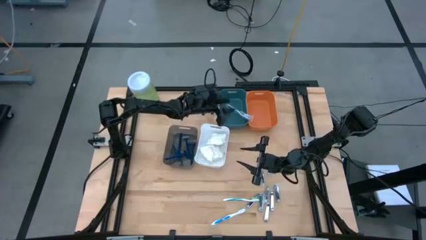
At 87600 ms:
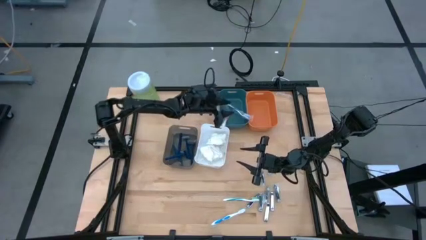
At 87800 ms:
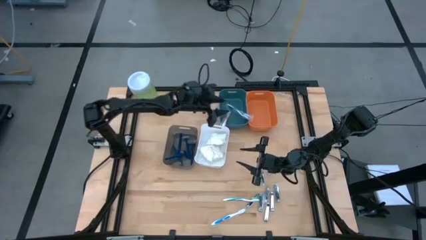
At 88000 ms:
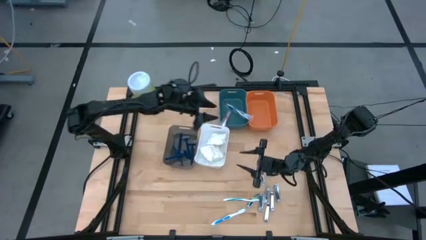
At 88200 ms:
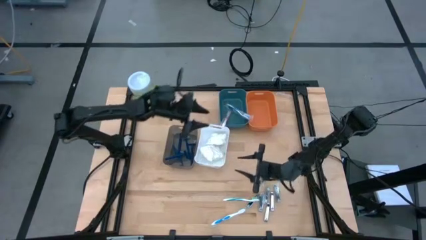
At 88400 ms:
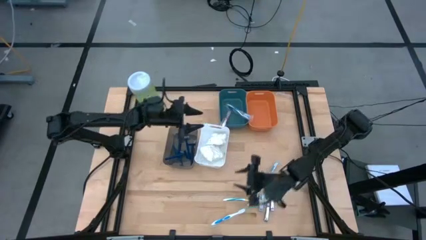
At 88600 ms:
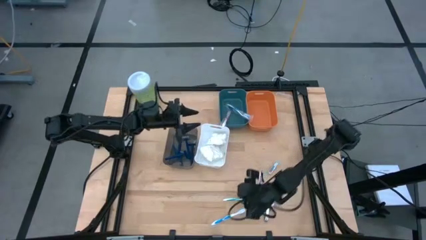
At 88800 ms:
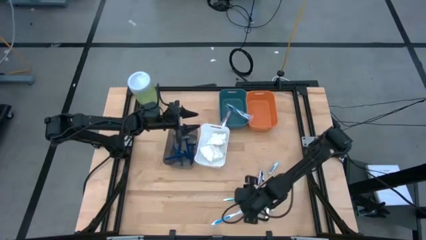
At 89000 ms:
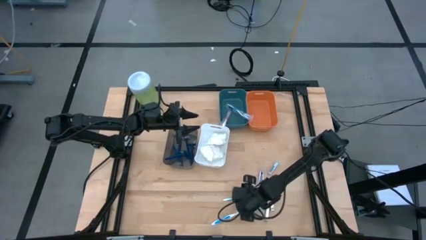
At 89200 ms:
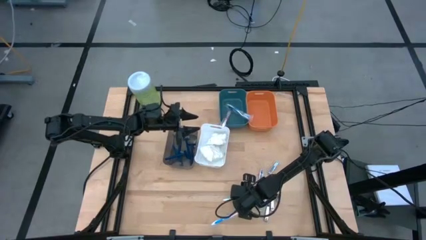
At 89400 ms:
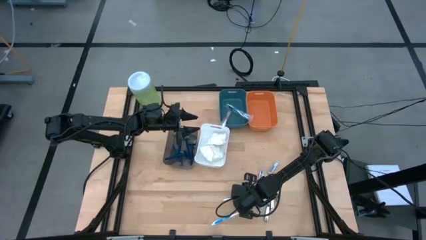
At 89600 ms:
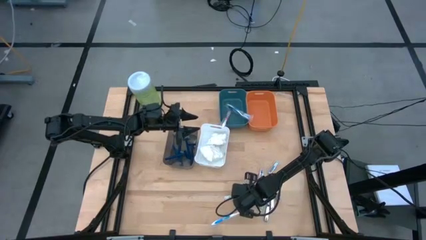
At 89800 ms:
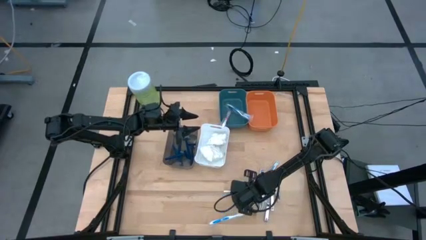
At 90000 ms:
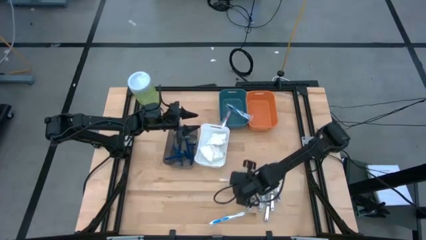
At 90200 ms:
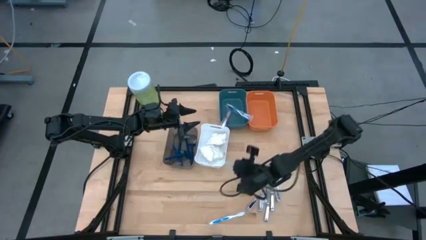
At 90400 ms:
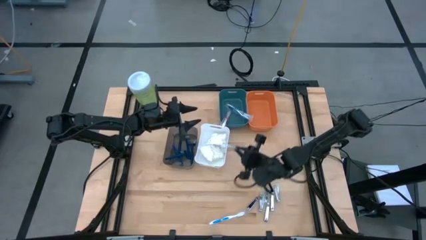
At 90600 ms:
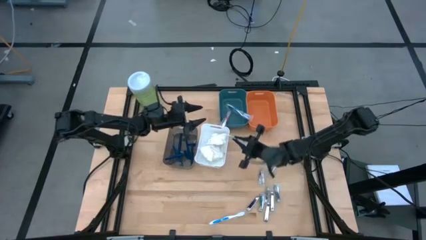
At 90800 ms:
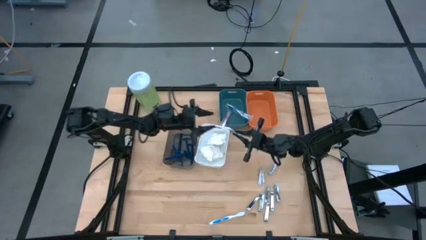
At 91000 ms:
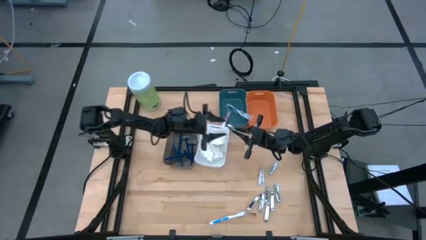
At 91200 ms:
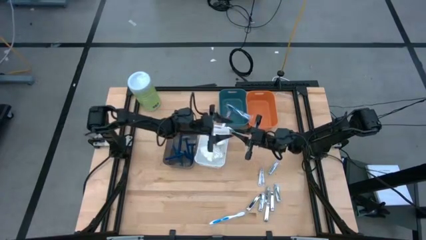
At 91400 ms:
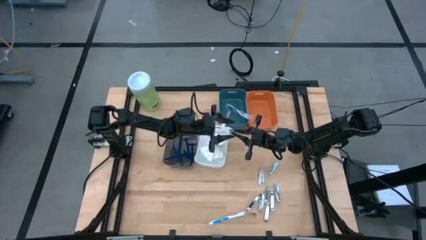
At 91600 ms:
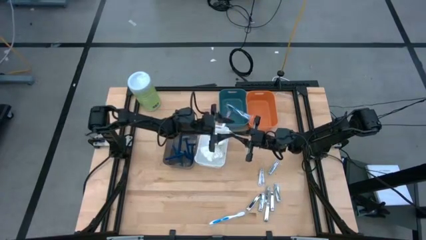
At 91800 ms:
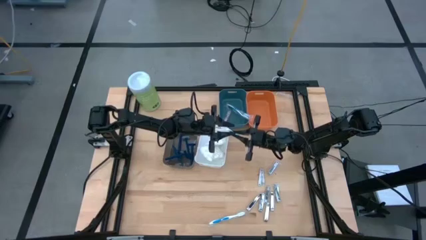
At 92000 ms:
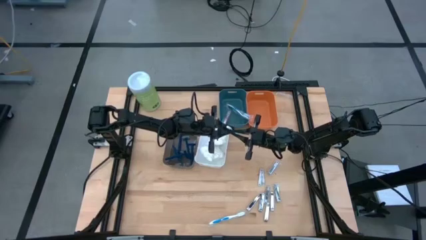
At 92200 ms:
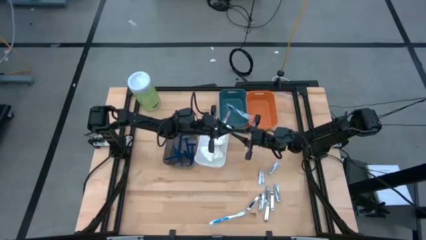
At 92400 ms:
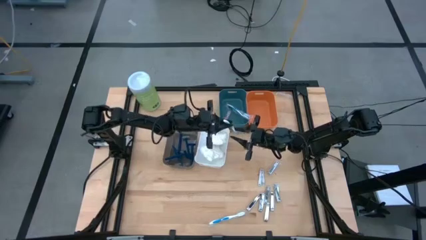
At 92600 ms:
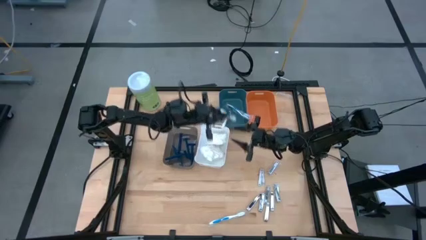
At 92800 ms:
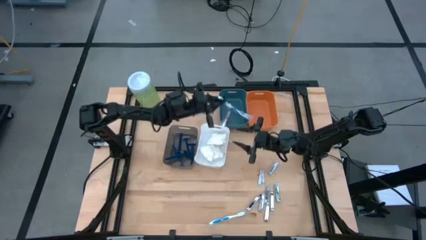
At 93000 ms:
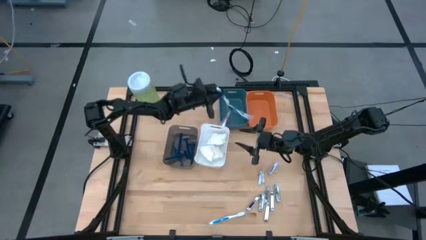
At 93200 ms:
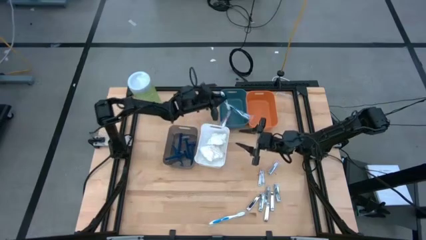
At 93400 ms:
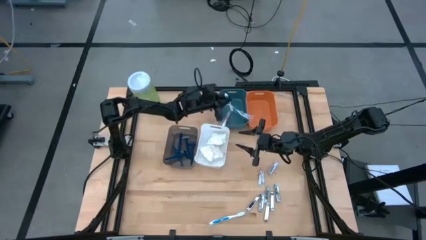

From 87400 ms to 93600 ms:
Task: Pick & Place Travel size toiletries
Put the green toothbrush into the green bin

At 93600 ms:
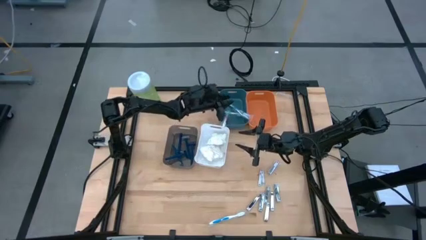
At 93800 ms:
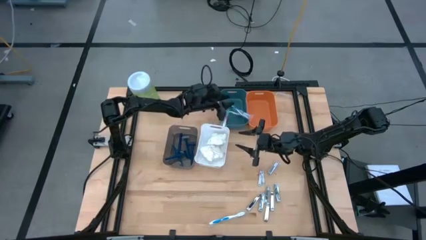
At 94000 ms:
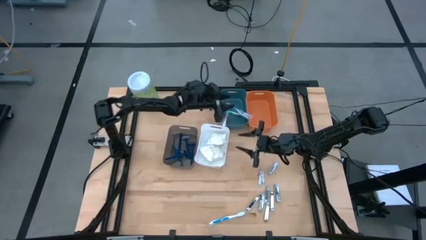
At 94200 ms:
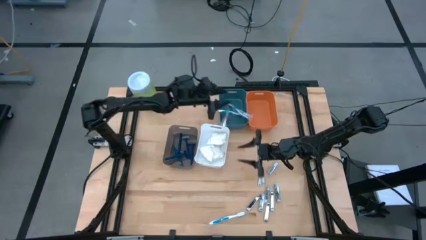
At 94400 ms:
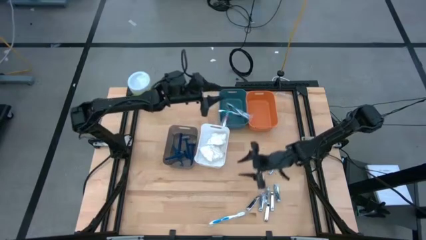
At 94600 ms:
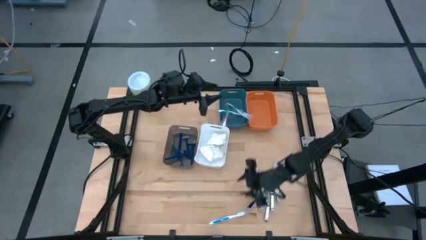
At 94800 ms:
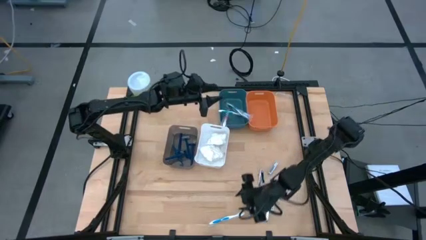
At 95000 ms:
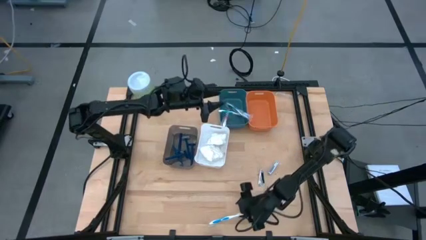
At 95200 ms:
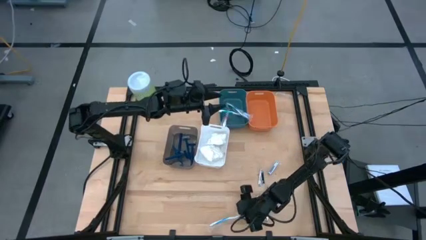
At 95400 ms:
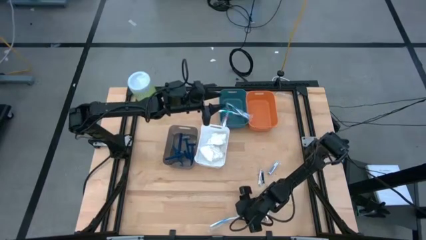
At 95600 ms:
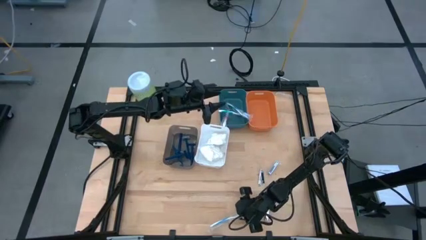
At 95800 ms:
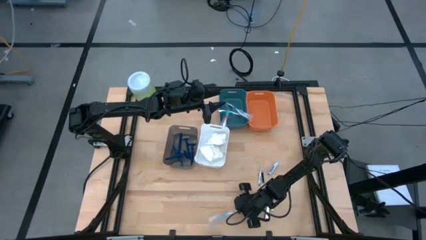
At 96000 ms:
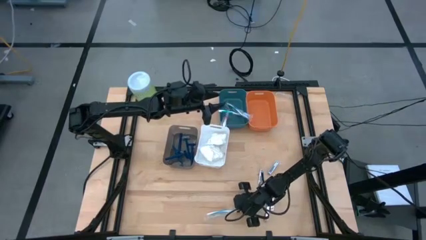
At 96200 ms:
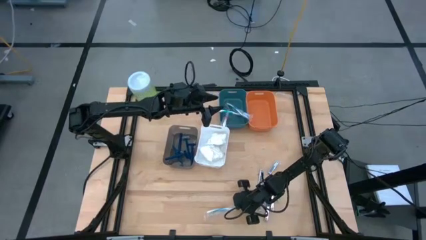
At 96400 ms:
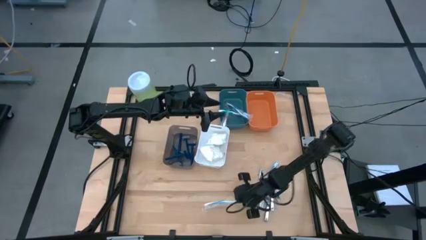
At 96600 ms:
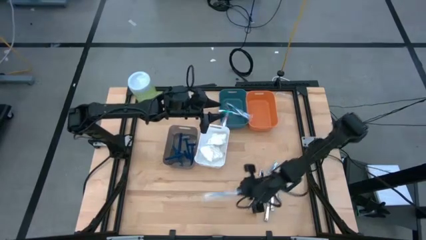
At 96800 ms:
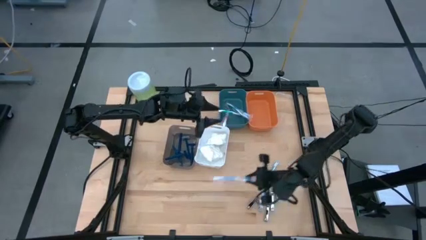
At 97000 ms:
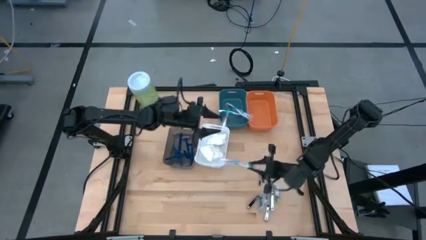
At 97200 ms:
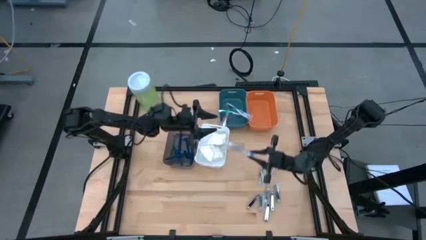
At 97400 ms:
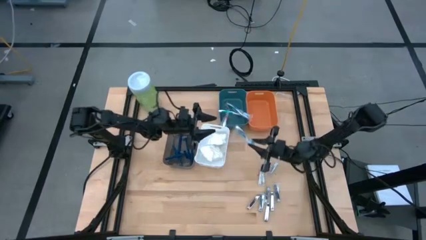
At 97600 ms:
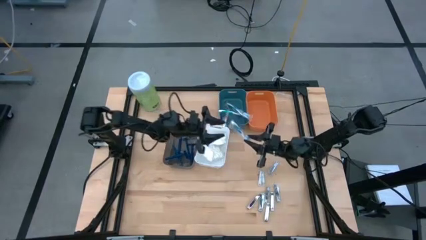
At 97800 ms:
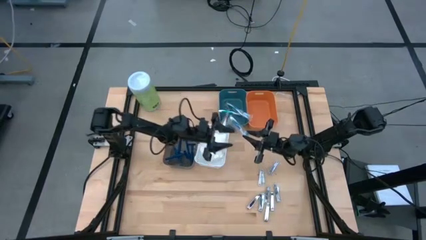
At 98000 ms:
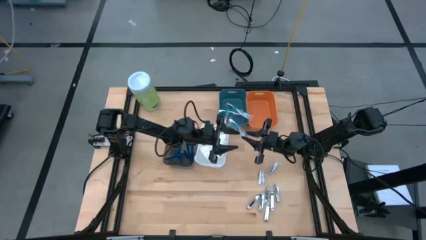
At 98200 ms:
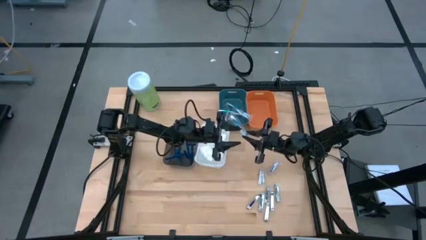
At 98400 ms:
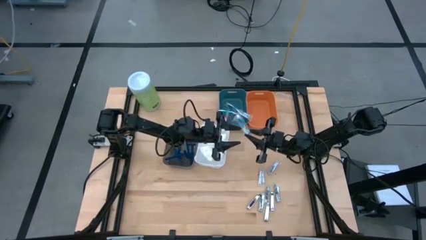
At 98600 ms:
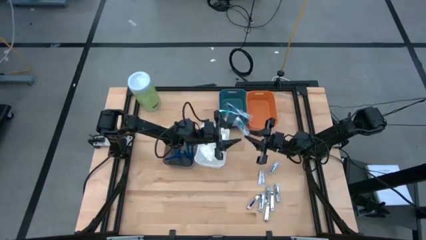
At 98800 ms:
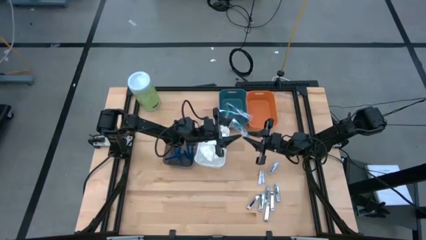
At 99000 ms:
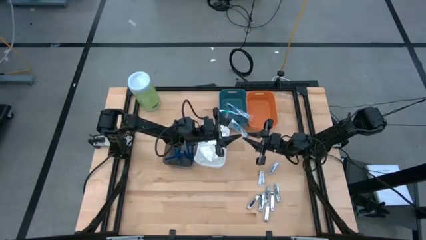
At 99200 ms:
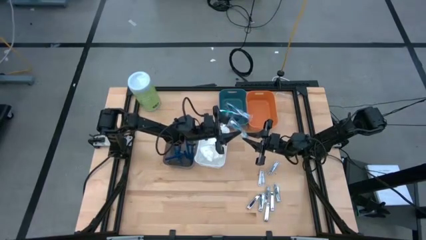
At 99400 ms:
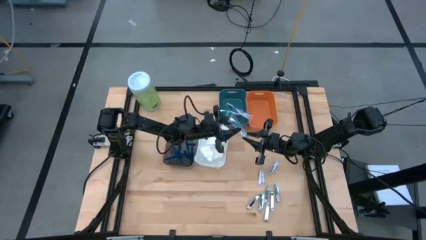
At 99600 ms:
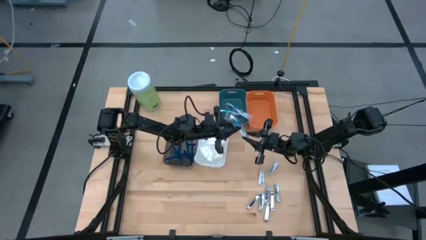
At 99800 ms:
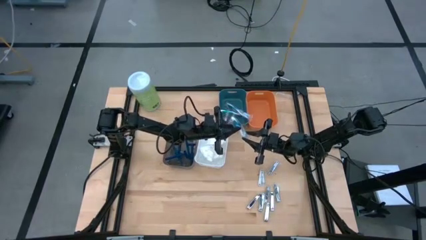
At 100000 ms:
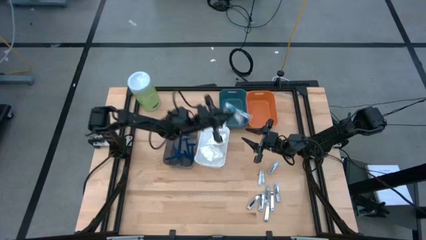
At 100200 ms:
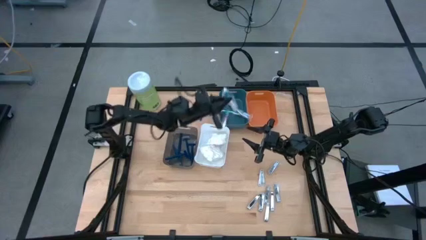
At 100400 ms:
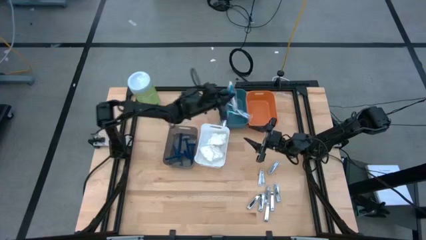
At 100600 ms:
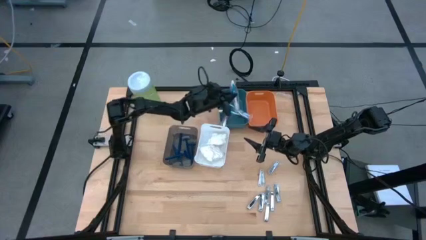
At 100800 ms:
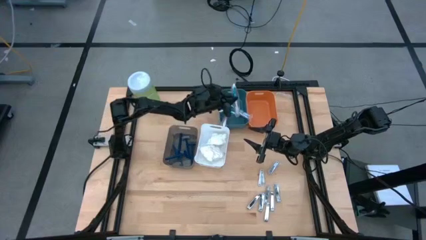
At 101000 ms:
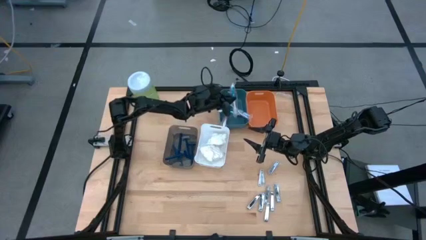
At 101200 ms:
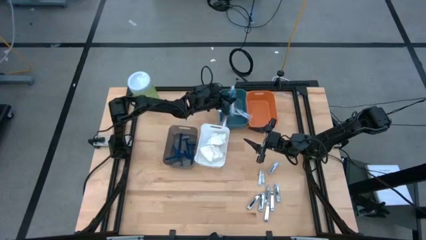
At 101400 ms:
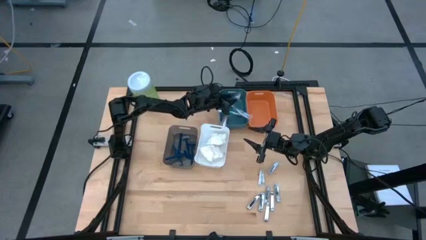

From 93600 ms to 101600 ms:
Put the blue toothbrush into the green bin
